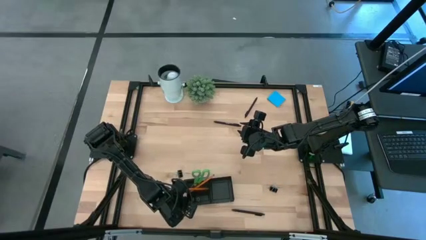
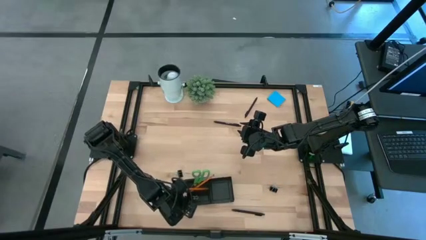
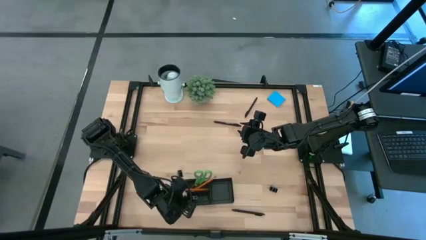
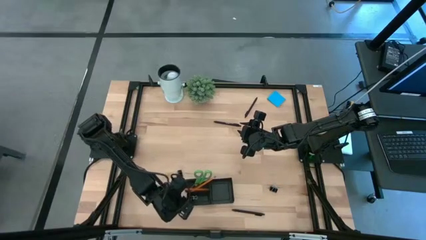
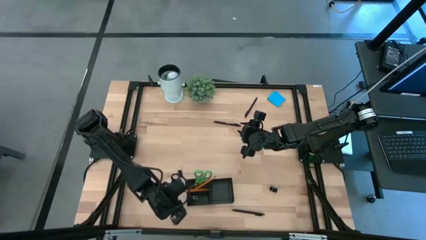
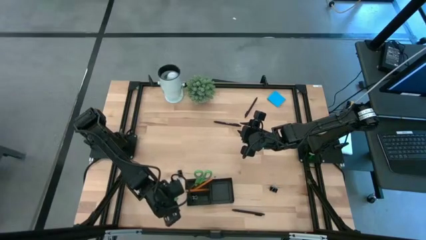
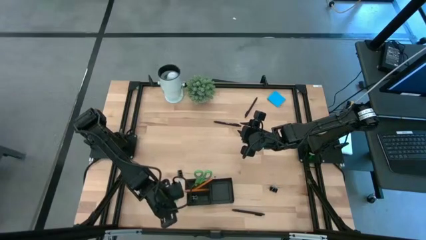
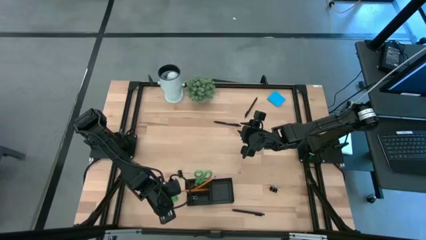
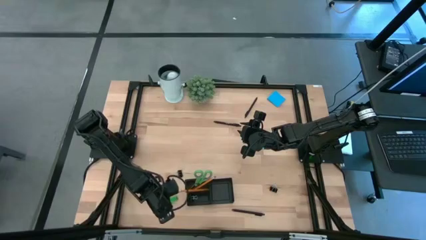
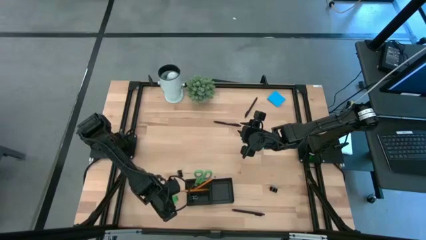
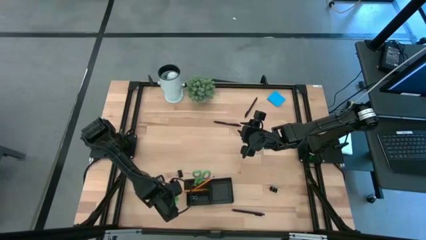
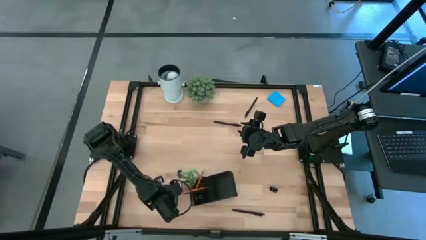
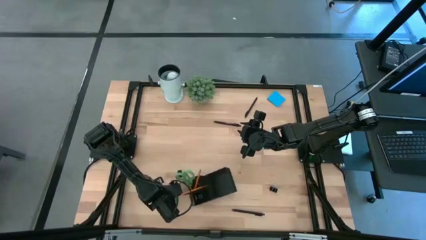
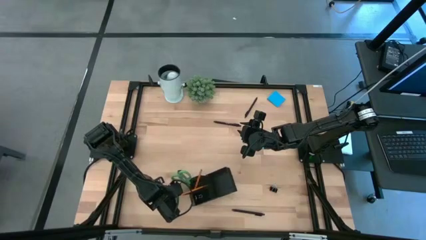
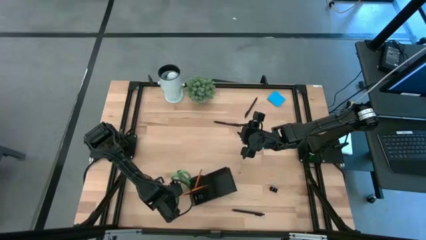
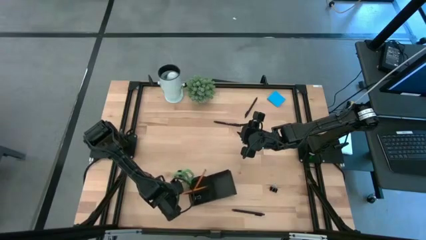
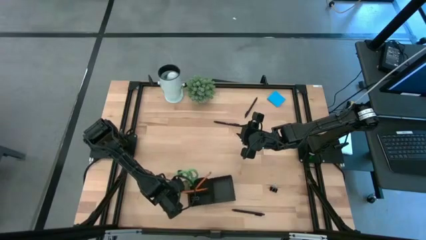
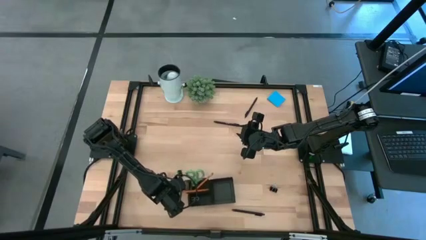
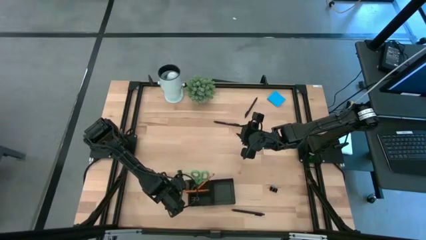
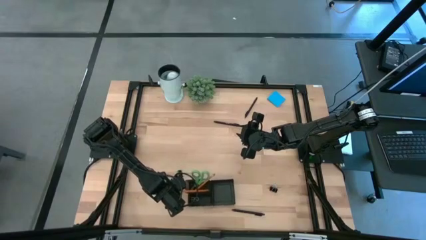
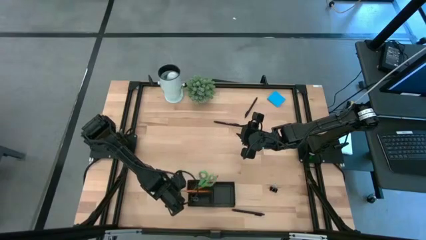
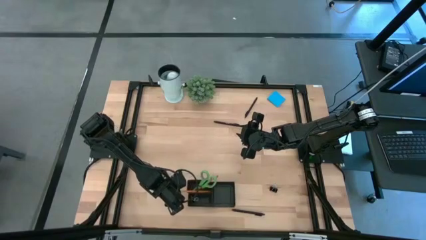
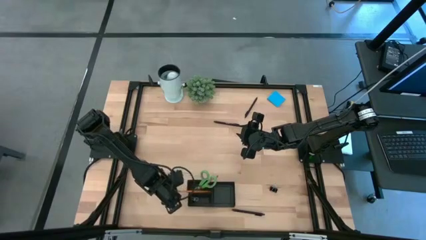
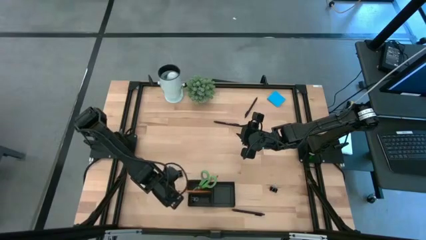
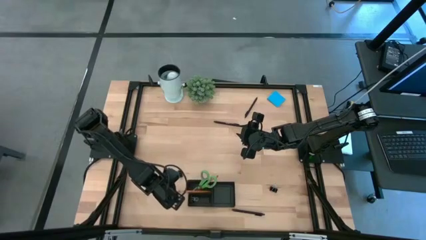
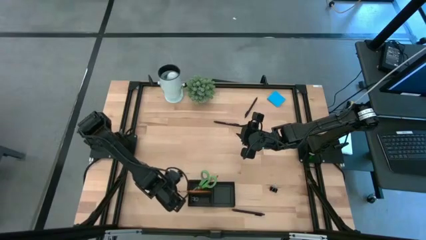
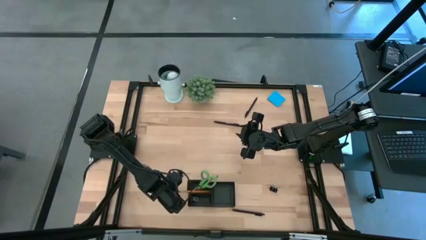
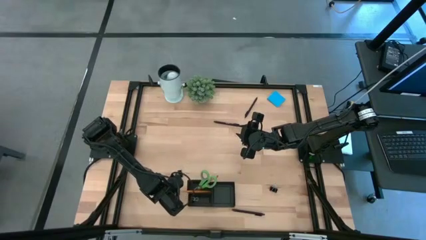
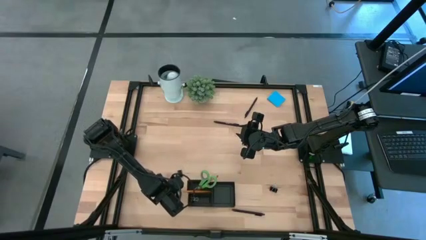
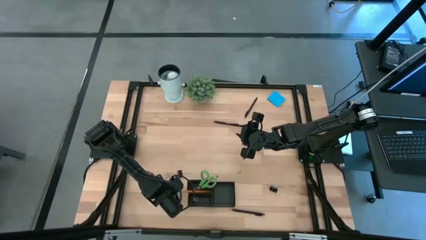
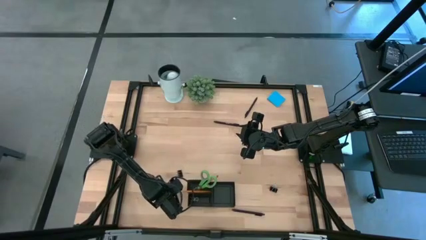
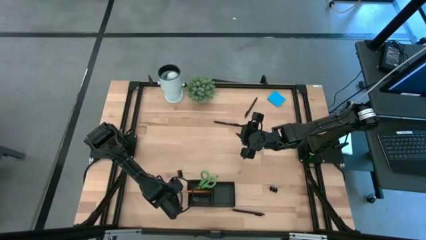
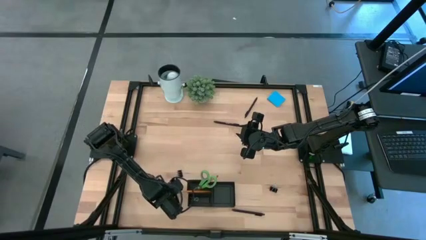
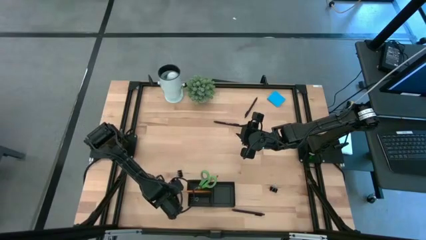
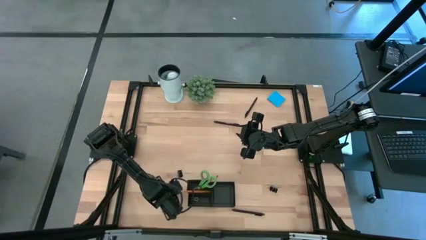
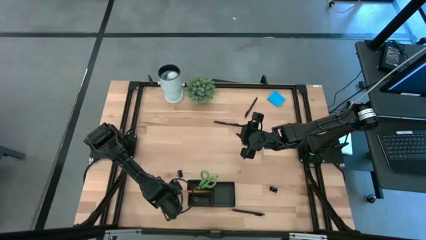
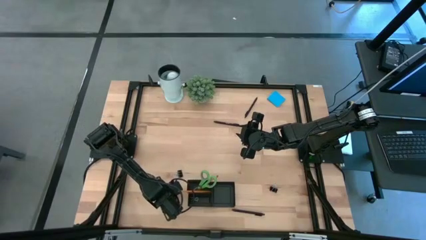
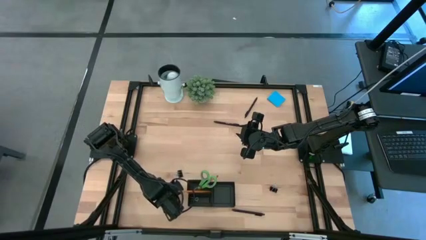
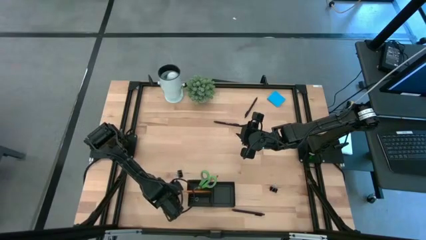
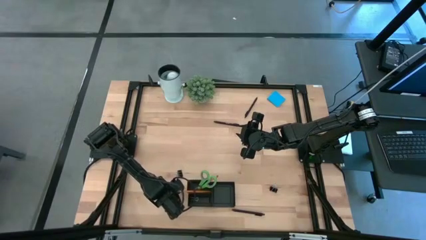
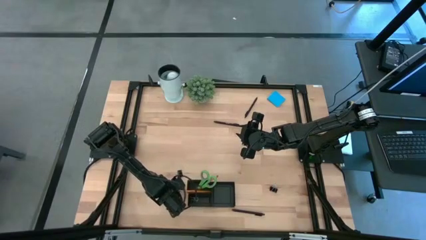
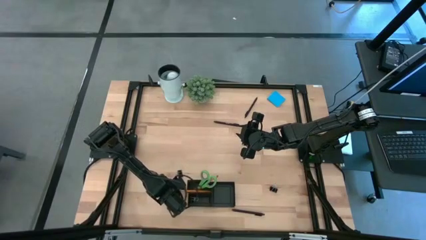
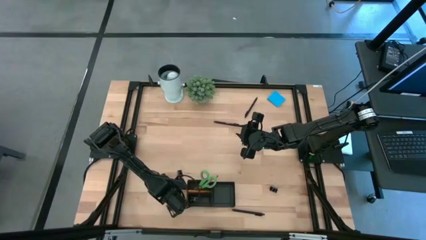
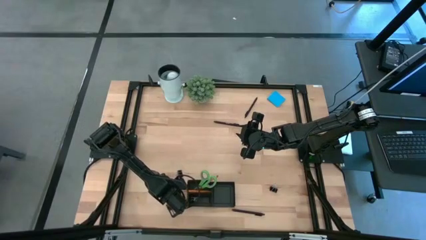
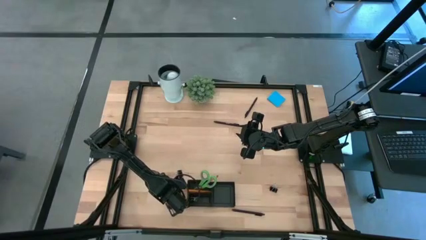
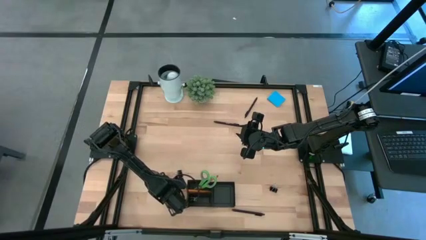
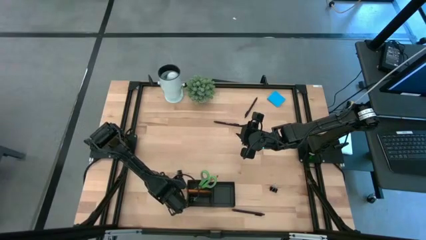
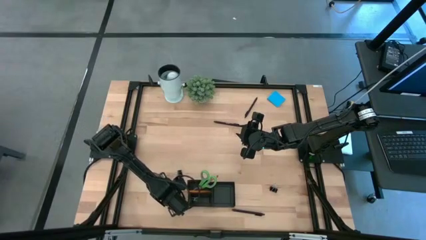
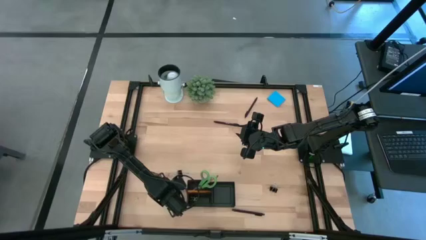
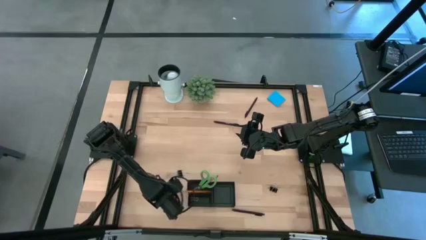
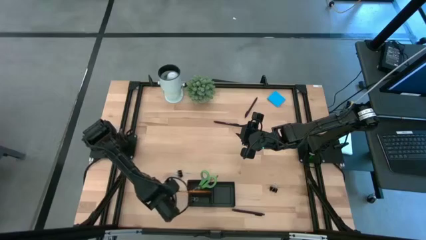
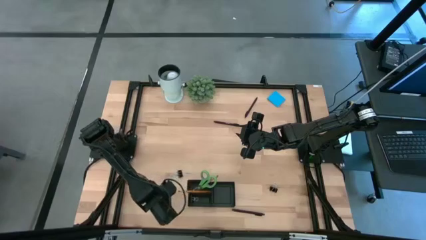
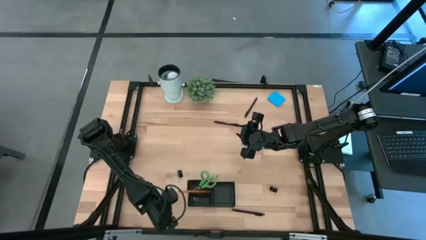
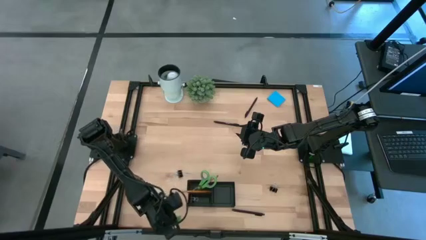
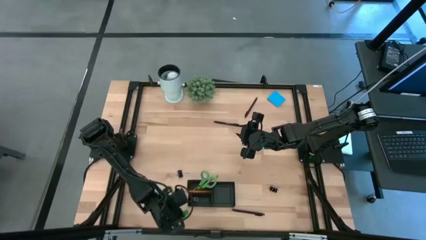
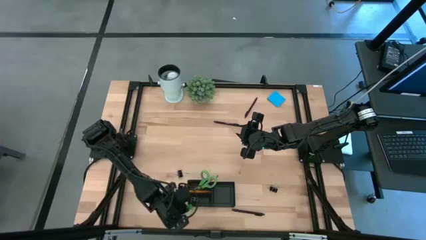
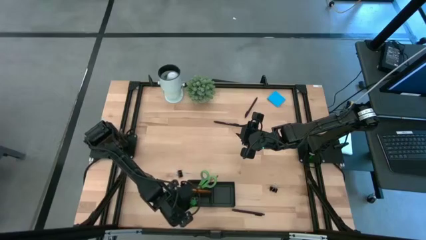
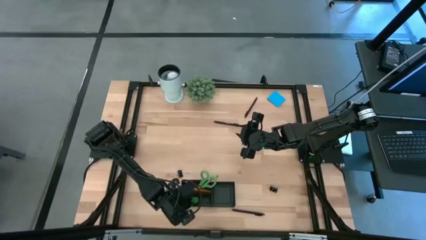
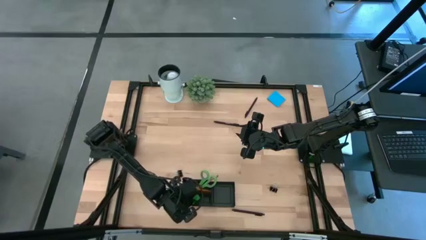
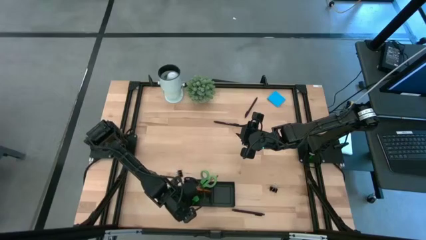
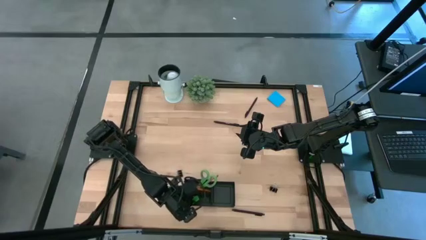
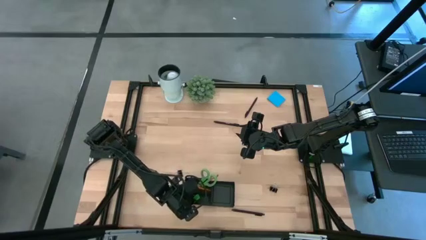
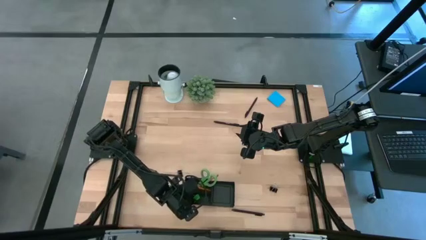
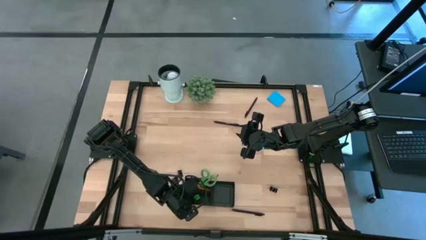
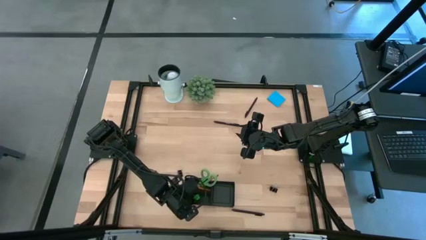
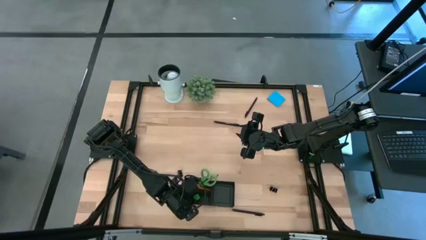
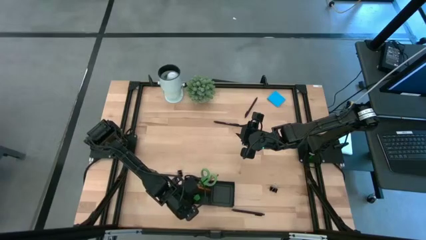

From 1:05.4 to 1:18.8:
Task: Pick and place office supplies into organizer
Put the green eraser into the black desk organizer
